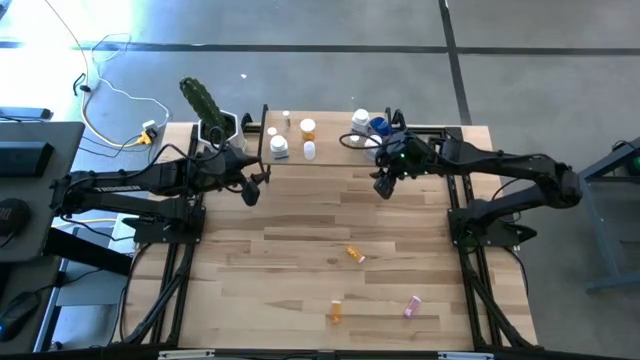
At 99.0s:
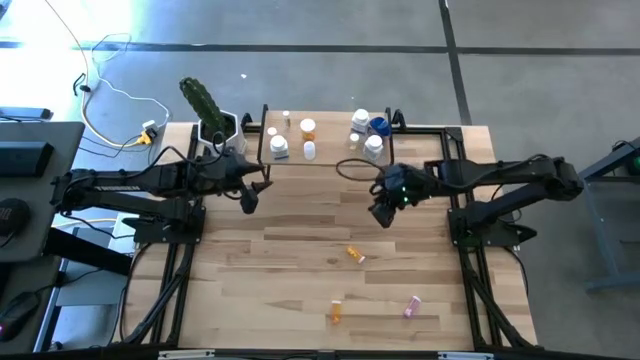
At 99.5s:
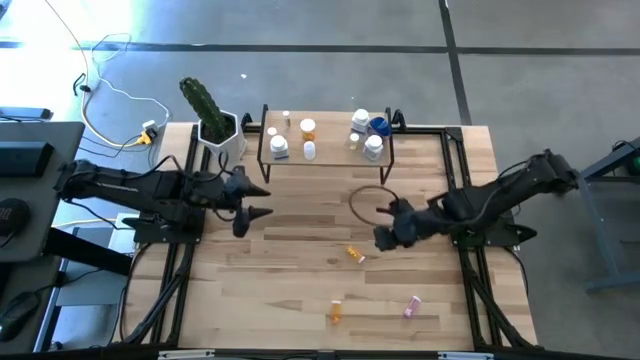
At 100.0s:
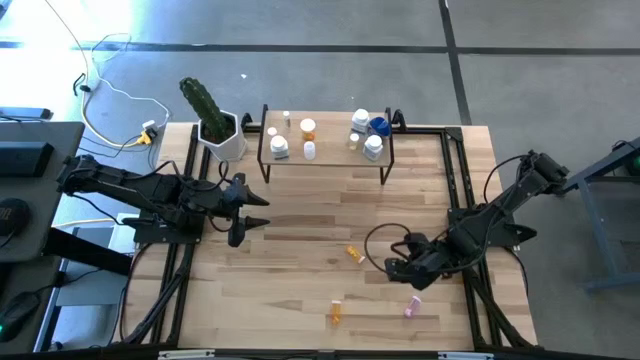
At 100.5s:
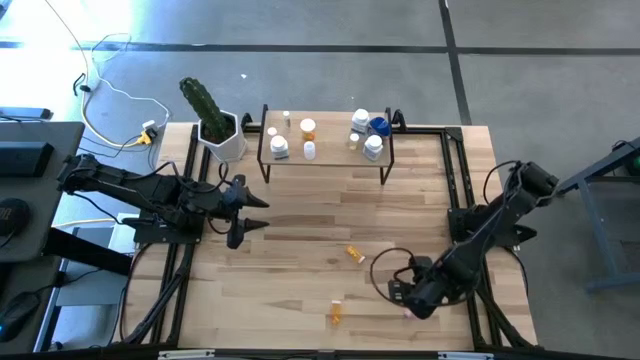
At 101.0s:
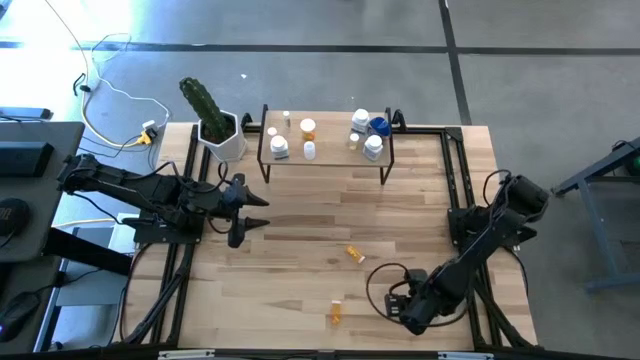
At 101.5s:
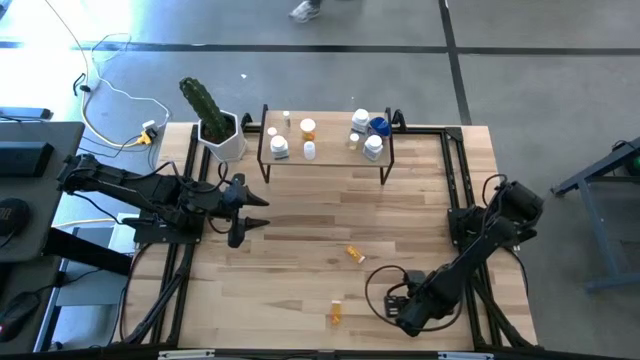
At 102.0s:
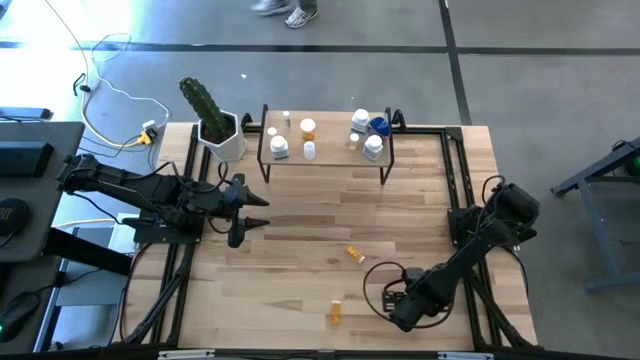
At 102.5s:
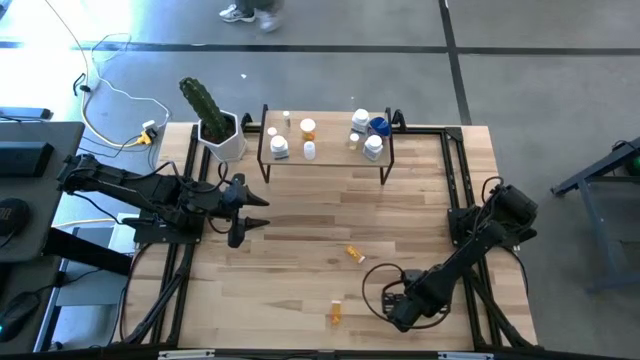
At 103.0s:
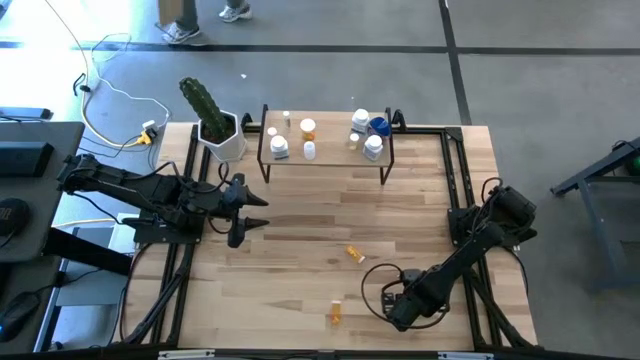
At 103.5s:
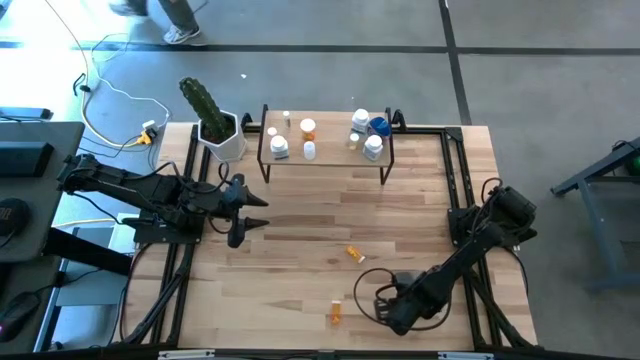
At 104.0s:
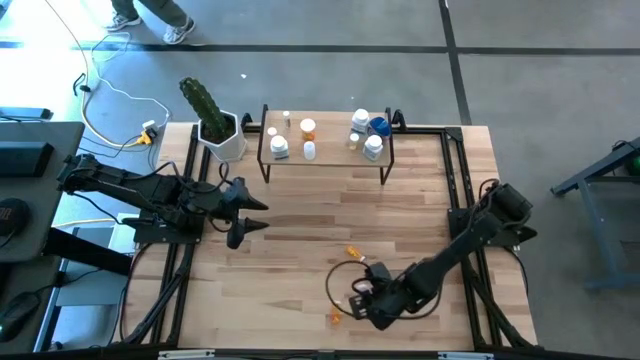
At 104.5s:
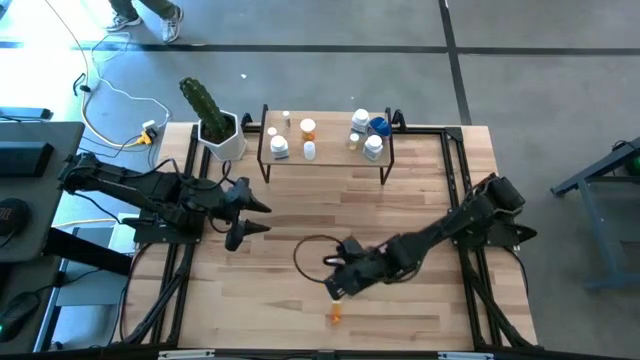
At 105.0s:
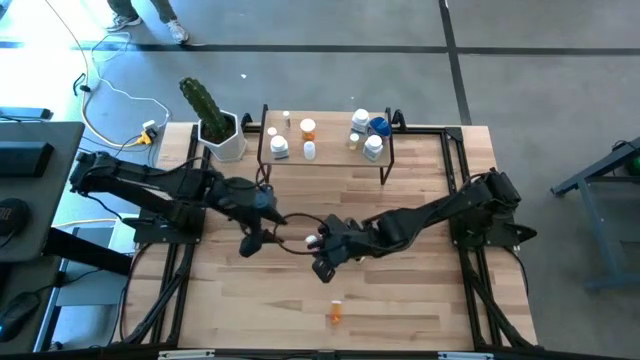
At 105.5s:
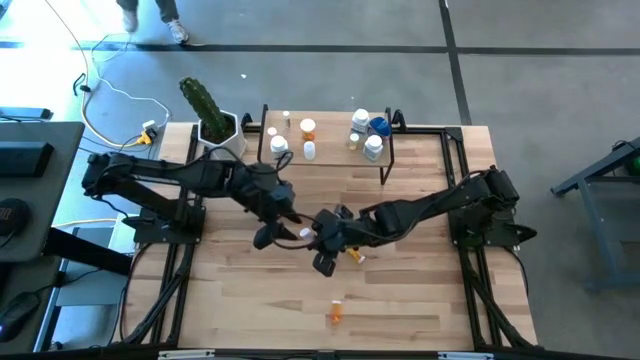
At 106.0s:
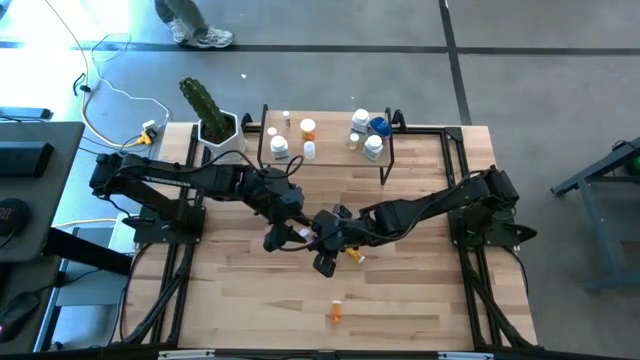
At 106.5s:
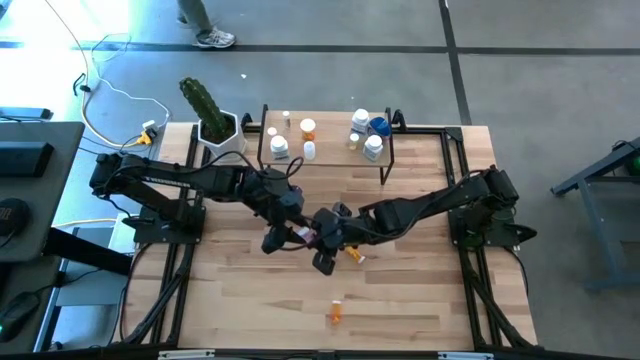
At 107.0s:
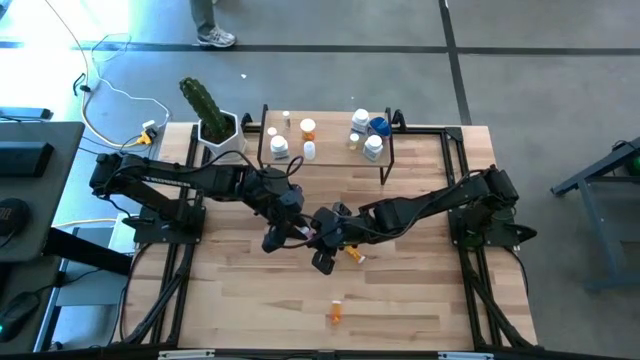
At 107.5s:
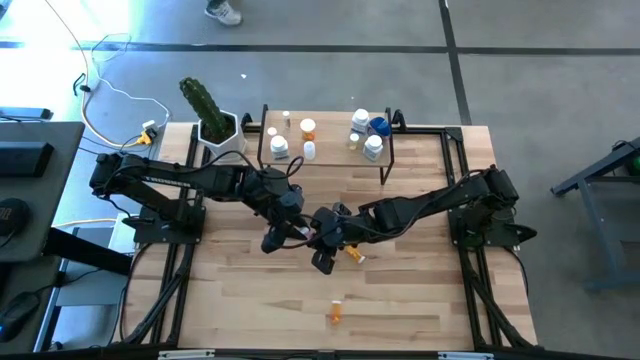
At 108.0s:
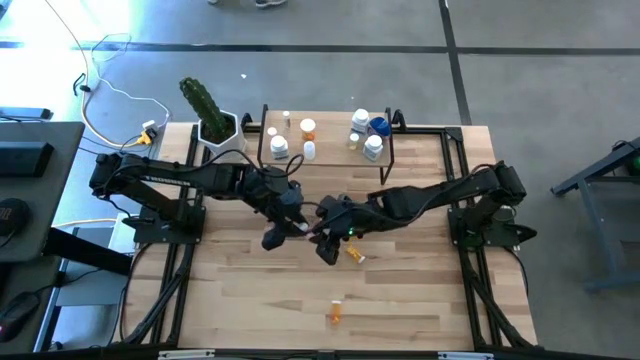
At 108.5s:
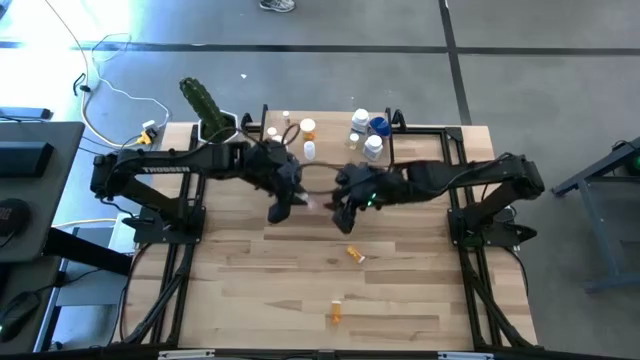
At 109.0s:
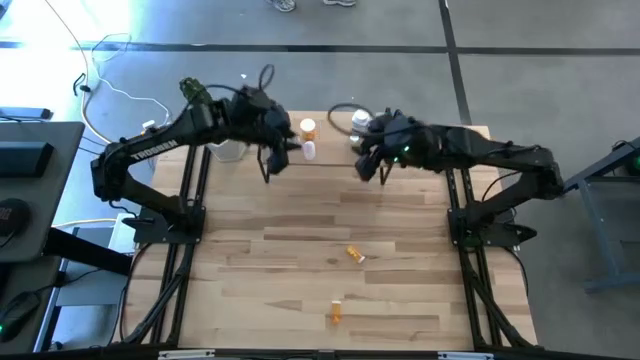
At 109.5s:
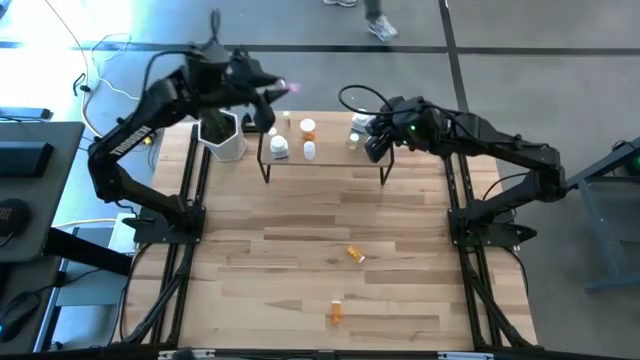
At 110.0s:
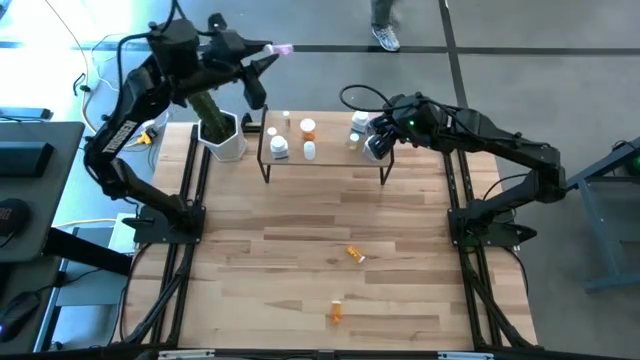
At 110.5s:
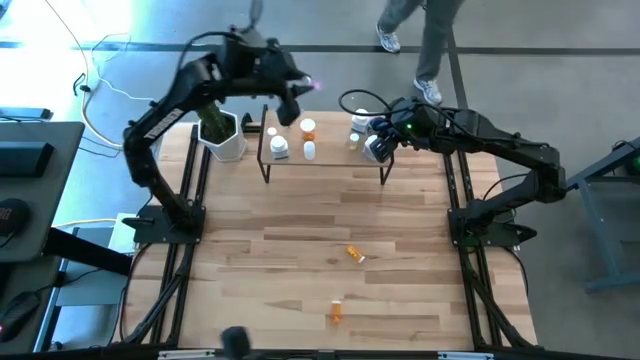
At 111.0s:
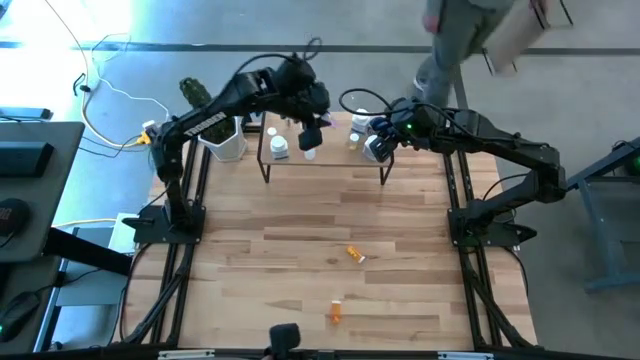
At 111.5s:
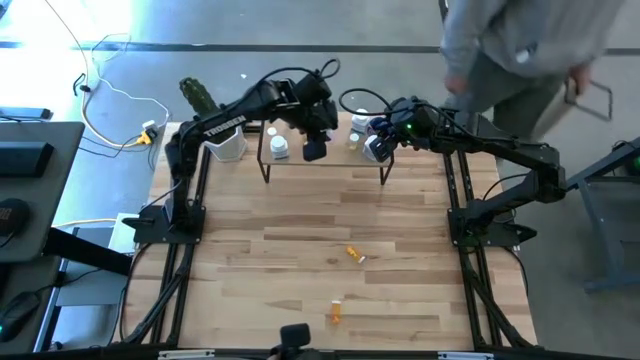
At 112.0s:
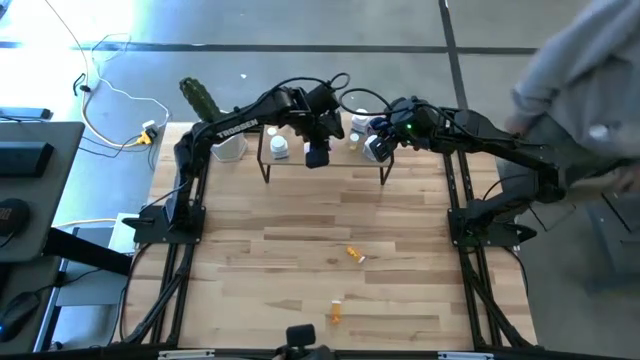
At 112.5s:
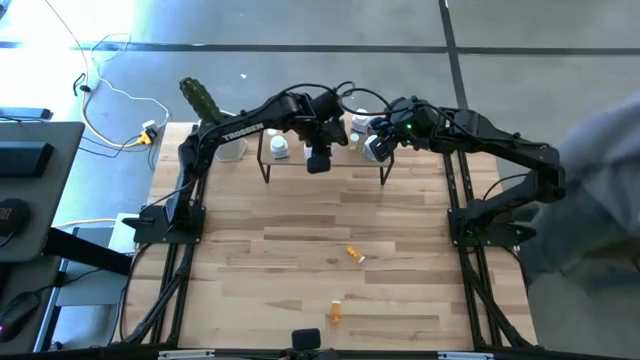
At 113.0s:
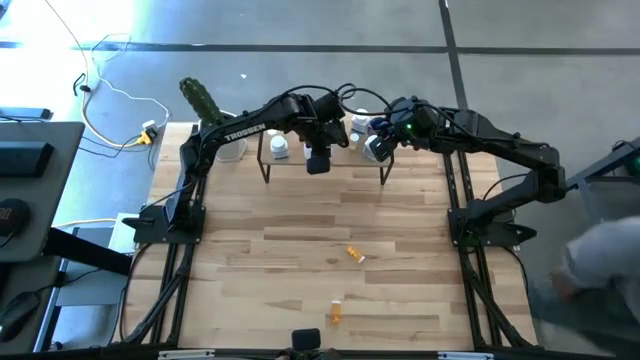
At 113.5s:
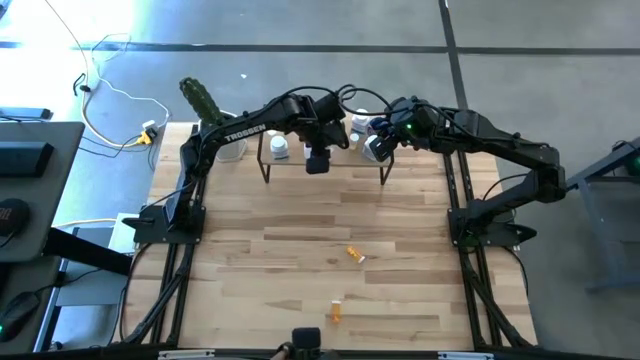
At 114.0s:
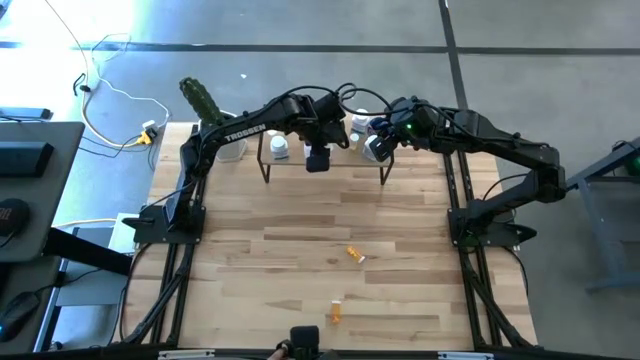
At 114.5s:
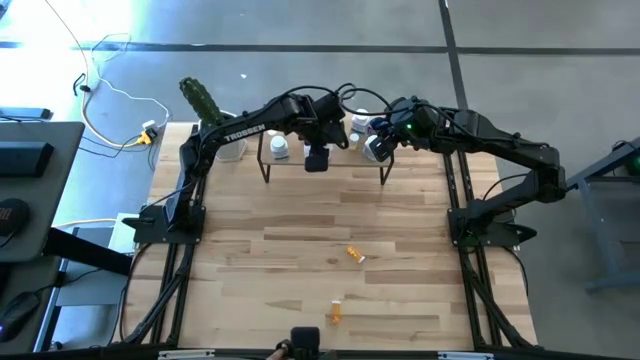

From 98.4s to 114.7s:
Task: Pick and place medicine bottles onto shelf by color
Put the pink pill bottle on the shelf

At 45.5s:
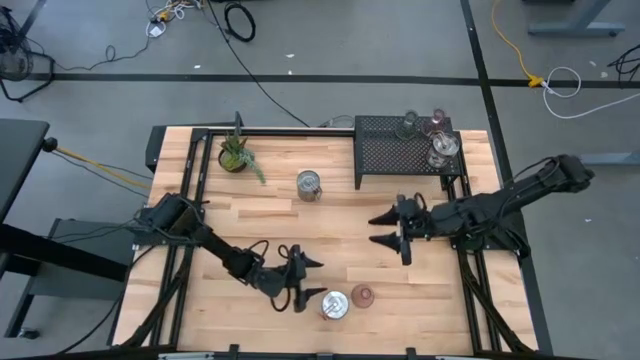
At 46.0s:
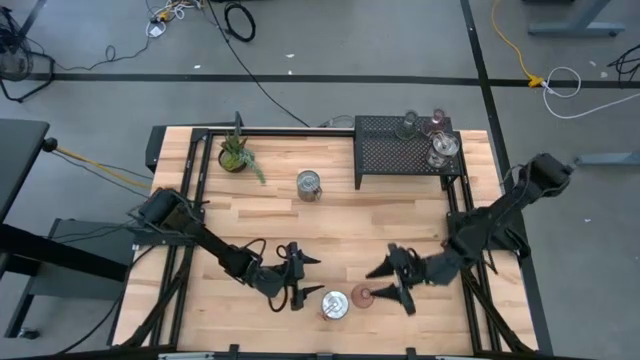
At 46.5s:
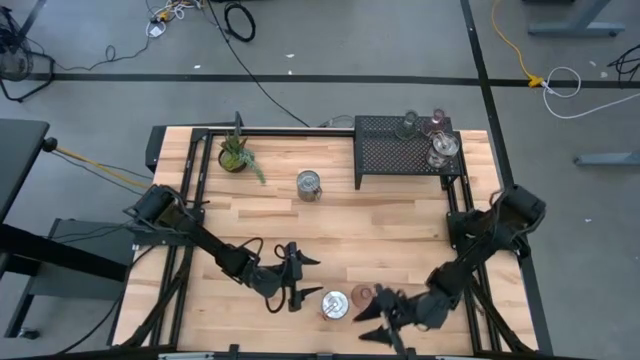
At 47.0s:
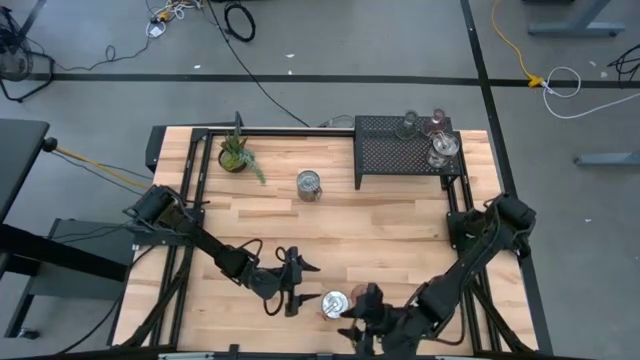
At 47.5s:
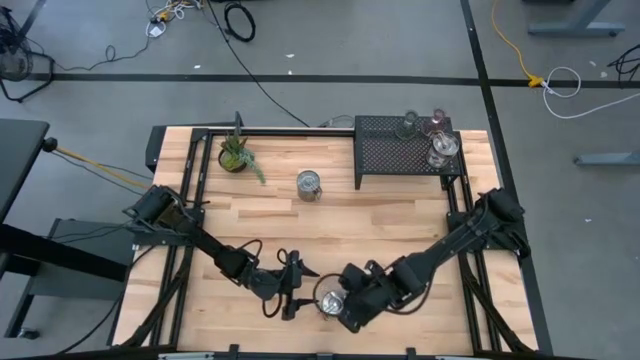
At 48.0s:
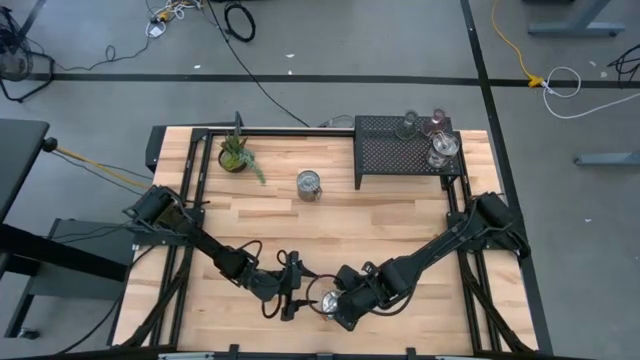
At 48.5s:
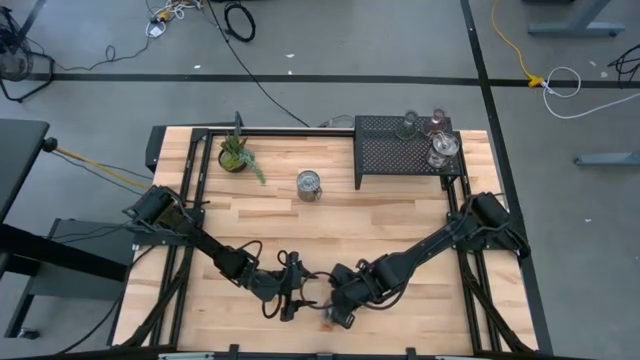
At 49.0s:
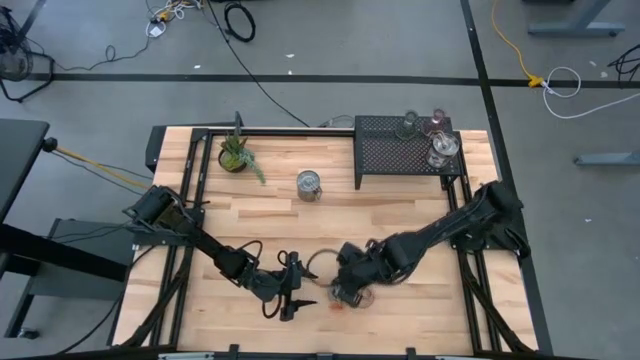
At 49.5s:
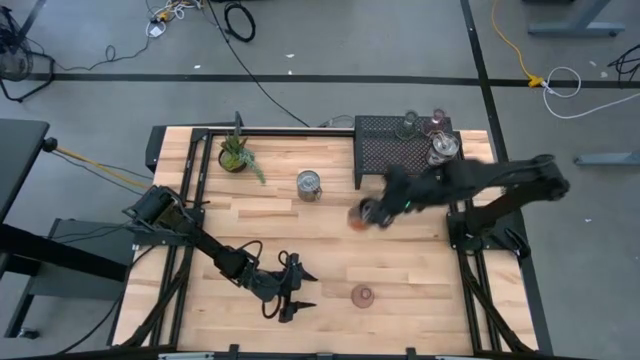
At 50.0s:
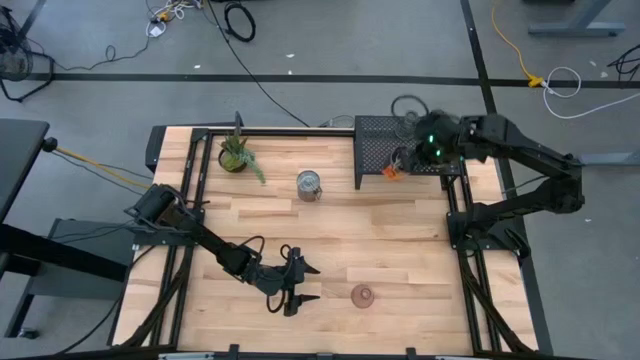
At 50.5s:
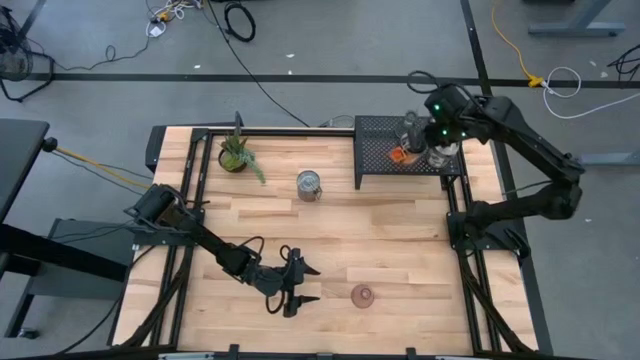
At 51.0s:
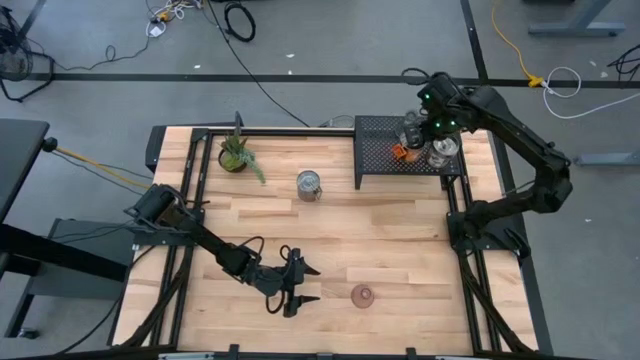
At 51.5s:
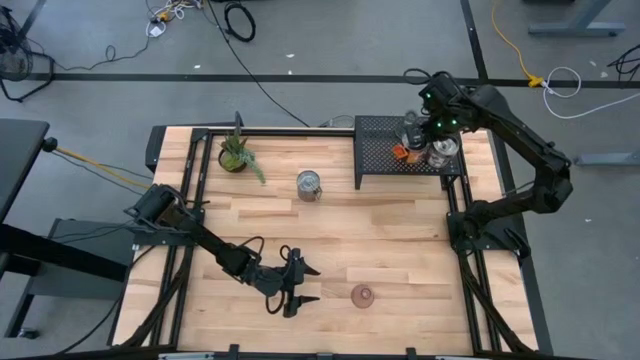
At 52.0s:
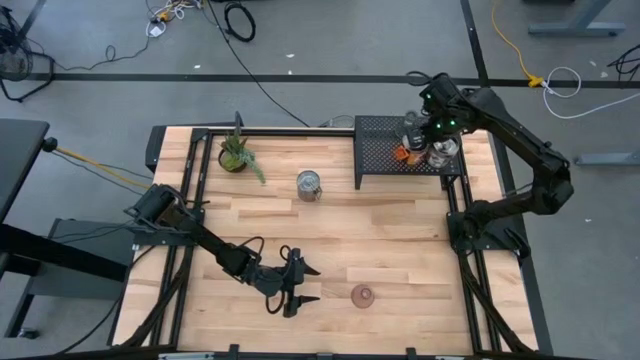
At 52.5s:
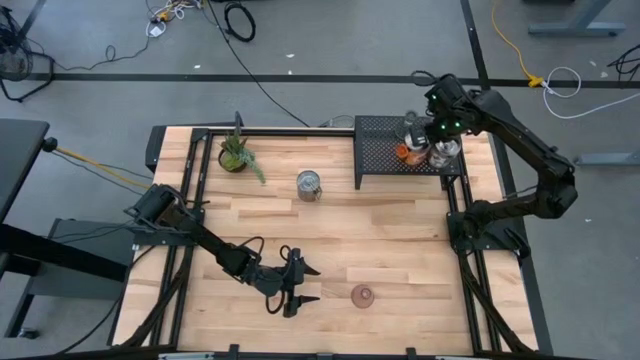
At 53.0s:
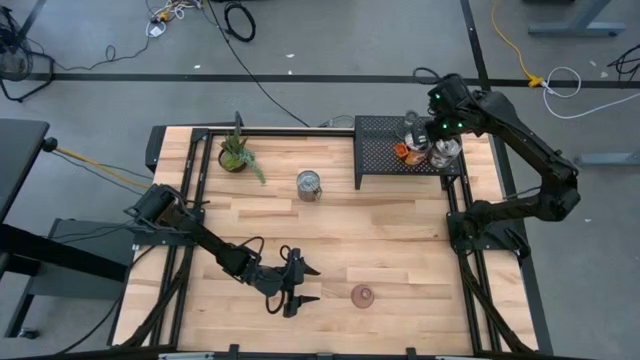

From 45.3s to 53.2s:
Task: Pick & Place candle stick holders
Put the orange scented candle on the shelf
